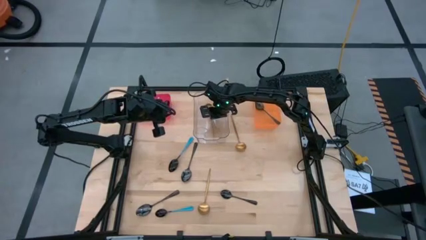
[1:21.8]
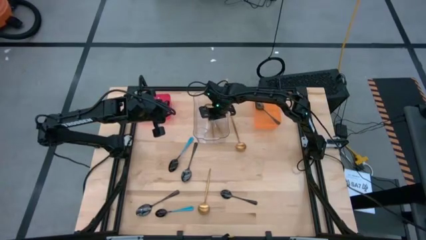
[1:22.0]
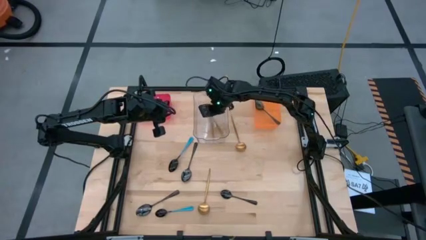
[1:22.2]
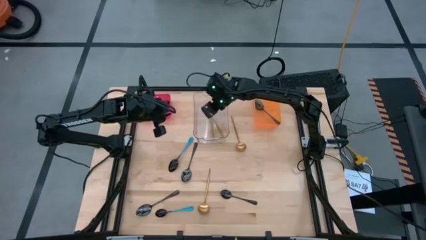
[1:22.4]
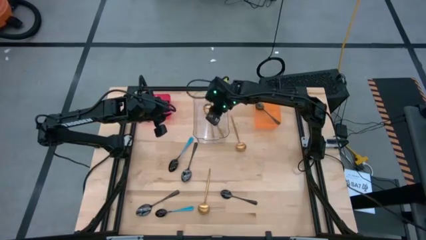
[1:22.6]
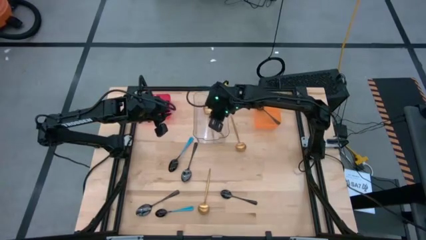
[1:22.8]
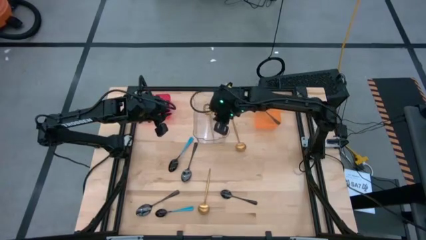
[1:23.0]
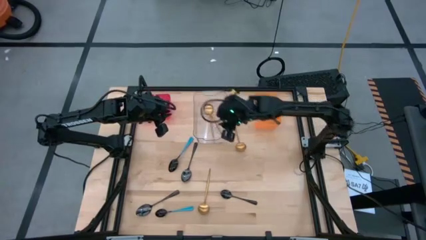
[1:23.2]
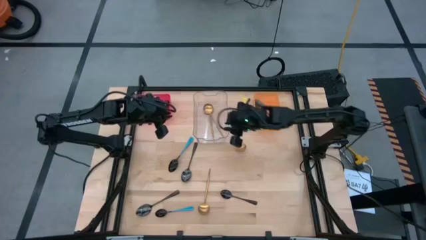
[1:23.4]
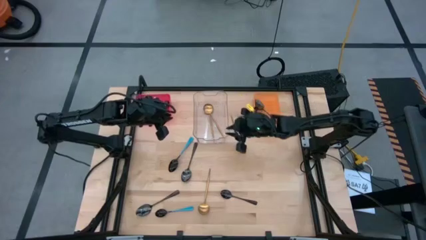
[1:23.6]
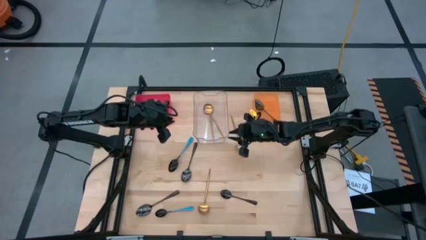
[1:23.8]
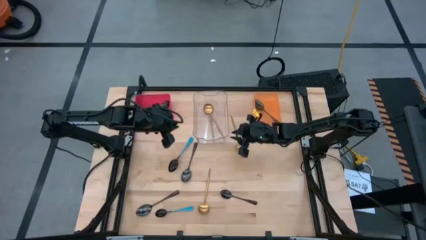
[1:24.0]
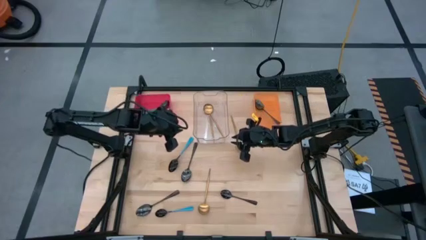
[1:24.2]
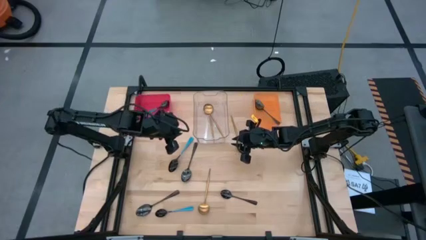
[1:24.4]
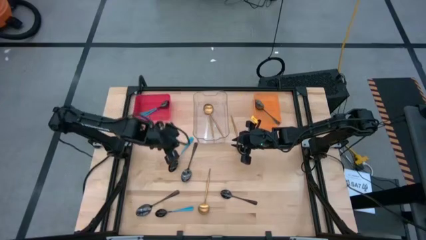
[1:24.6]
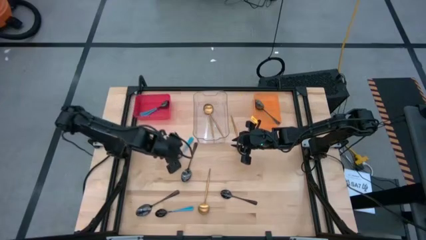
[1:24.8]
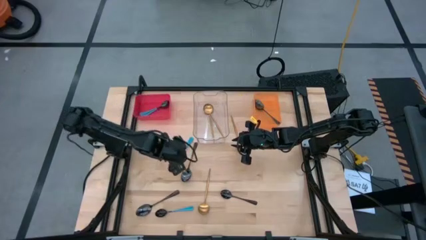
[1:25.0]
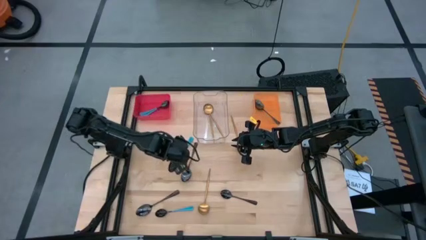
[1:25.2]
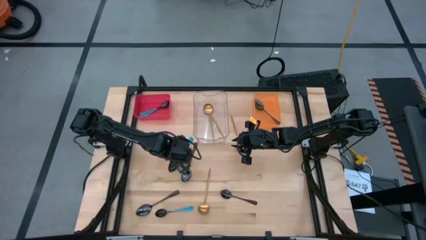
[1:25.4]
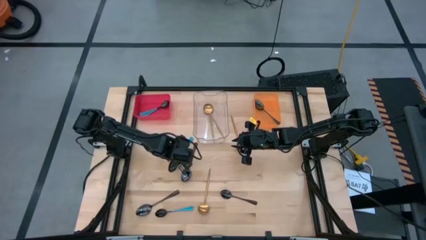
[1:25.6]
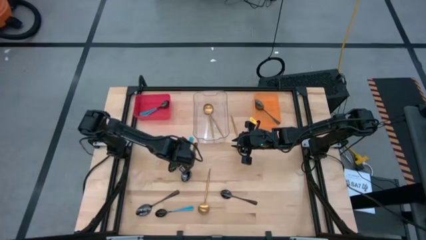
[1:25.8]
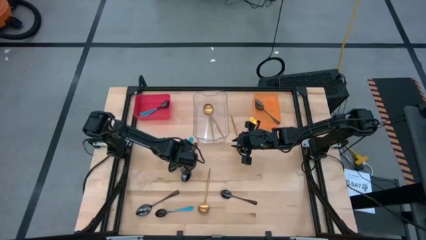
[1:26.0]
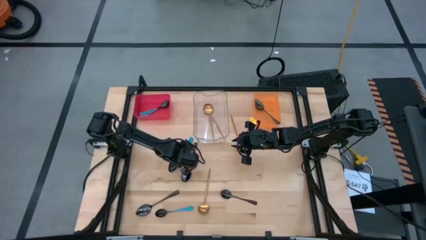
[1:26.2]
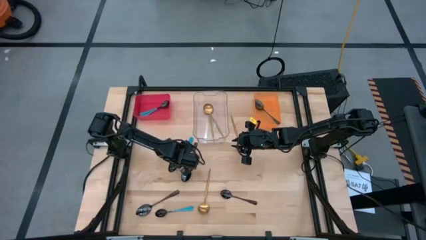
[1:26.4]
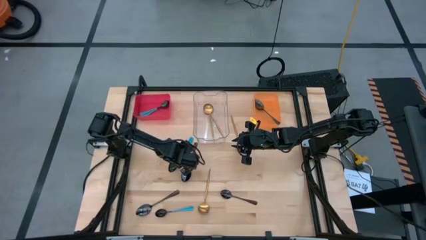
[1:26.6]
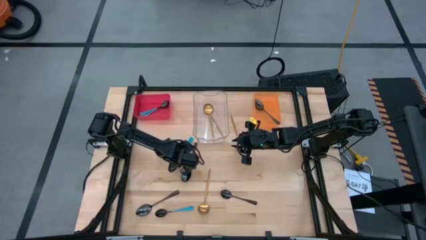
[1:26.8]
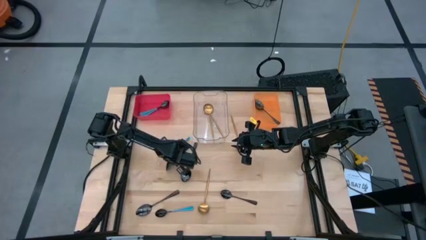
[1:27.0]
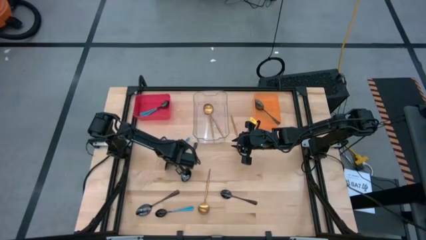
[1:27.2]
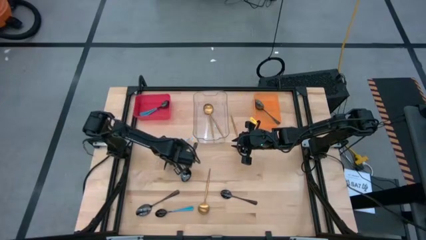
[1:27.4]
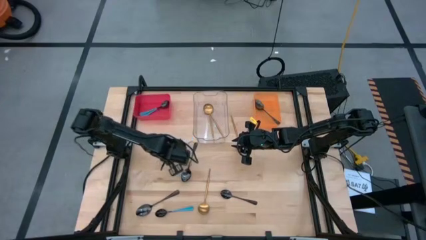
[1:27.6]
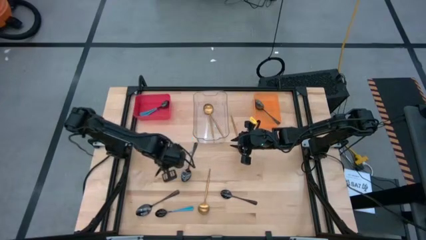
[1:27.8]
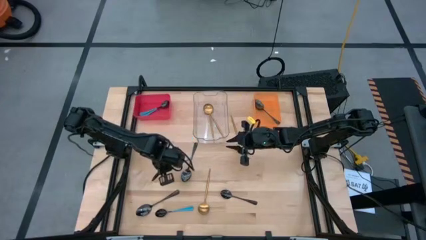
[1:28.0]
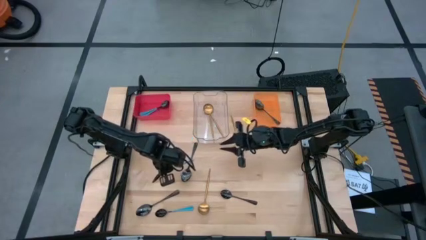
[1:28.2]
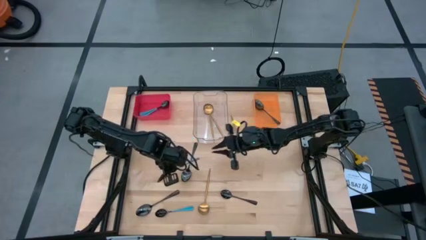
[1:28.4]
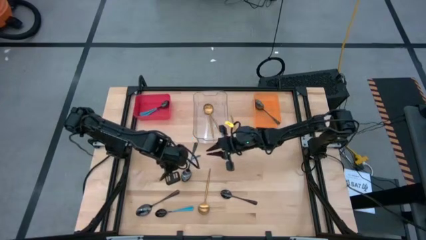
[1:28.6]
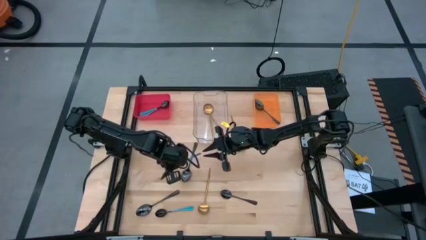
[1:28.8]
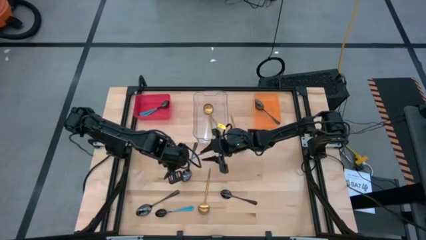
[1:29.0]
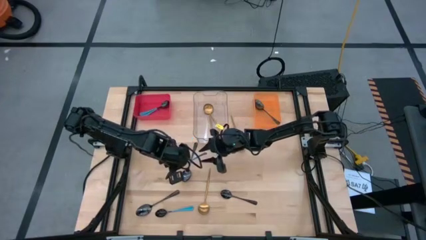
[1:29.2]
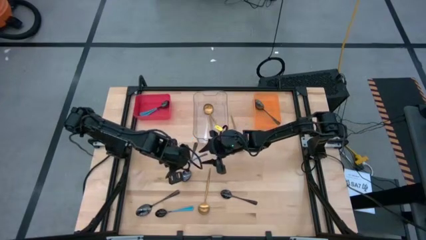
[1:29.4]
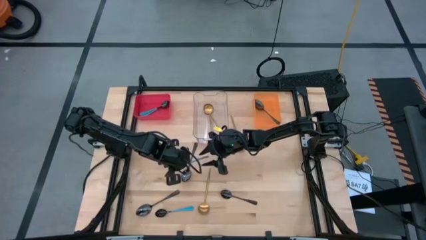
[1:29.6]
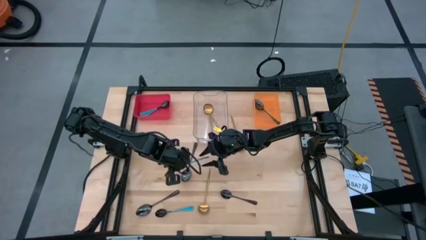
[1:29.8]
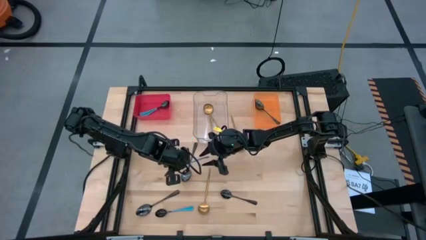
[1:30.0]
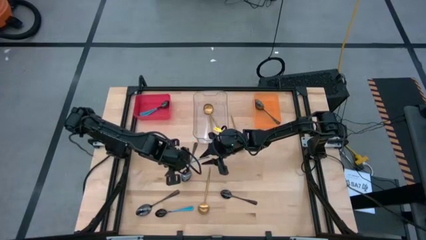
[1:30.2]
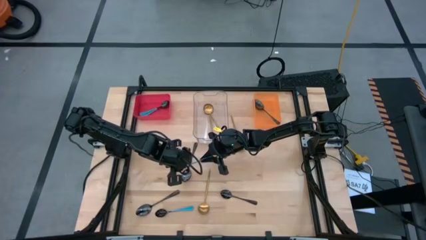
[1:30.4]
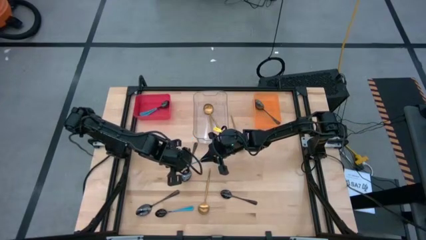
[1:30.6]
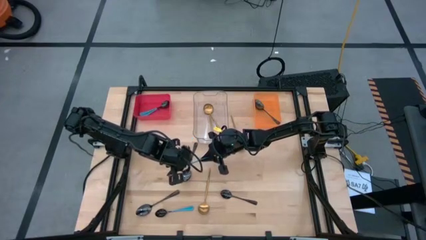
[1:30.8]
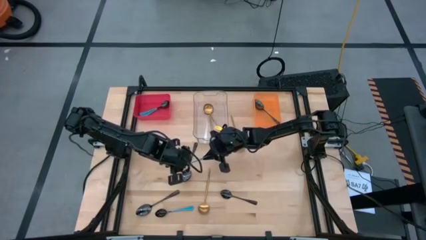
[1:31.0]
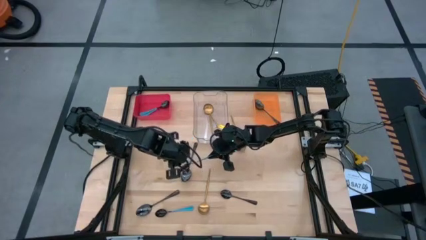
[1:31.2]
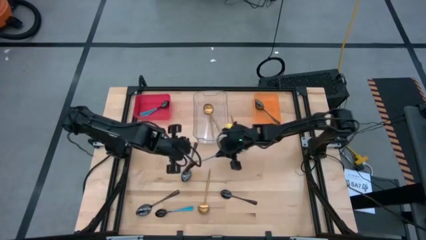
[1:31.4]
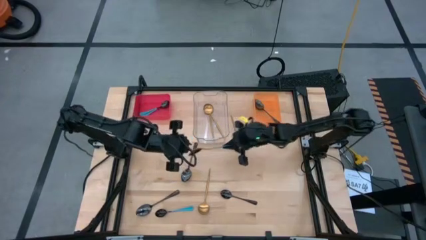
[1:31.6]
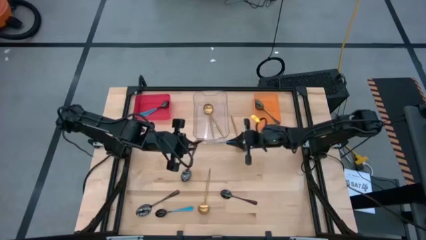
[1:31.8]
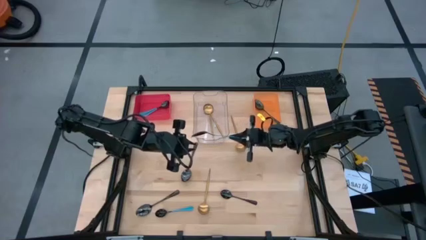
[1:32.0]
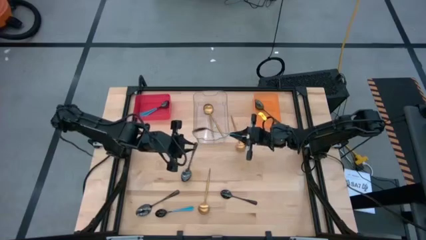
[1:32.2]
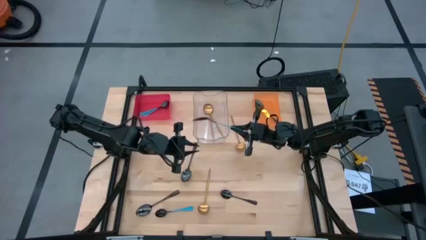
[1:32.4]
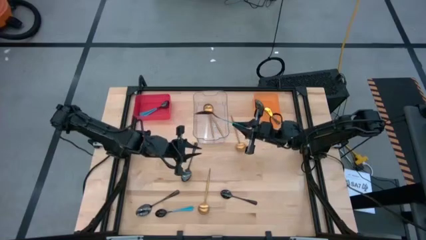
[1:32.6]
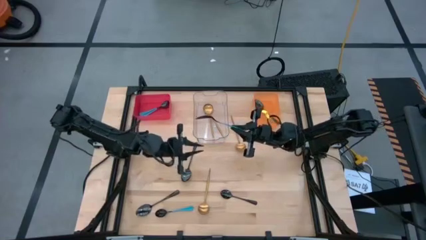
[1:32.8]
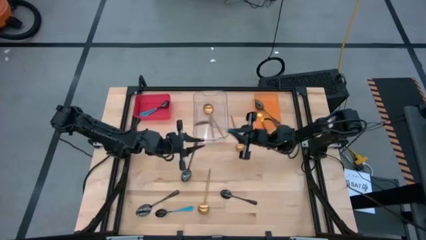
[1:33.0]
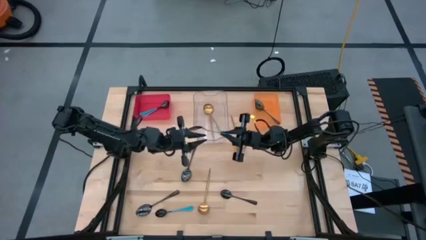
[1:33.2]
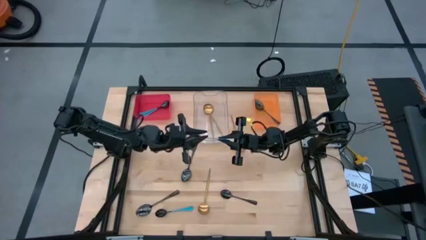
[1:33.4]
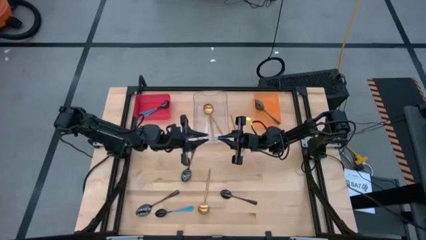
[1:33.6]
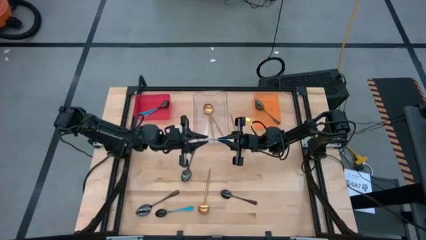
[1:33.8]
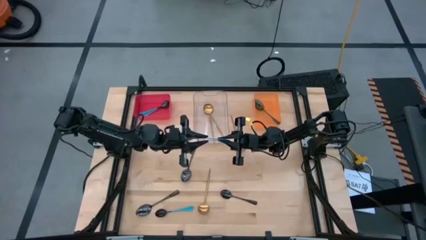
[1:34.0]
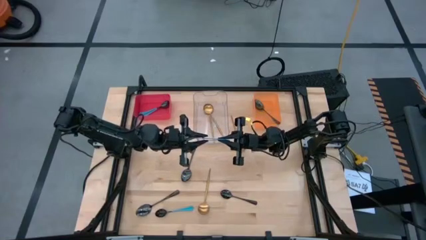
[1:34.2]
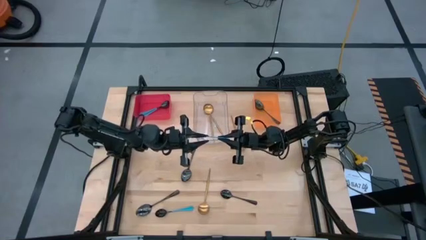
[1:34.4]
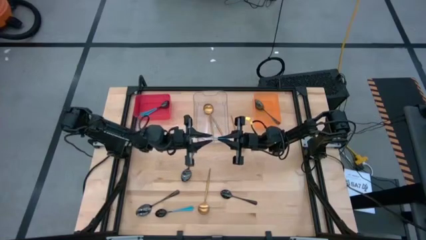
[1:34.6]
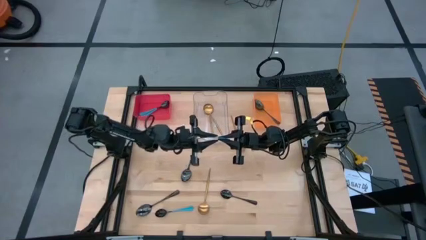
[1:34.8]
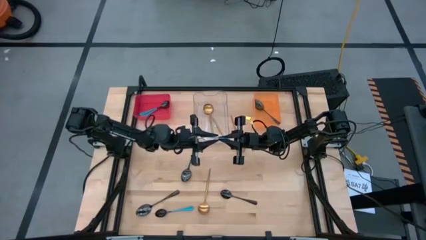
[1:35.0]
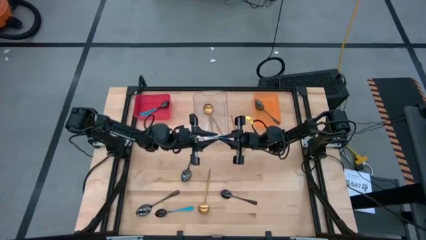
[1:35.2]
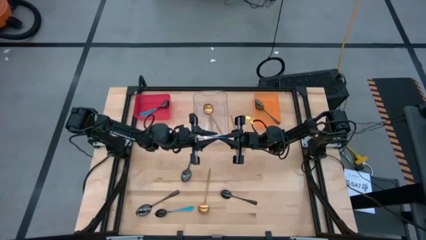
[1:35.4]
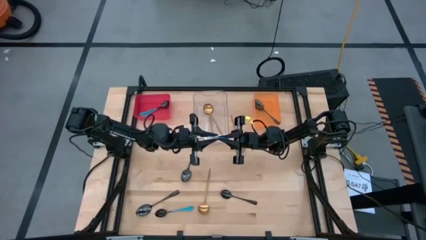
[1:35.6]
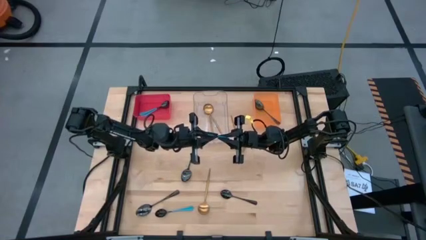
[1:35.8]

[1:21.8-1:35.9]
Task: Sort silverware by color (type)
Put the blue spoon into the red bin
